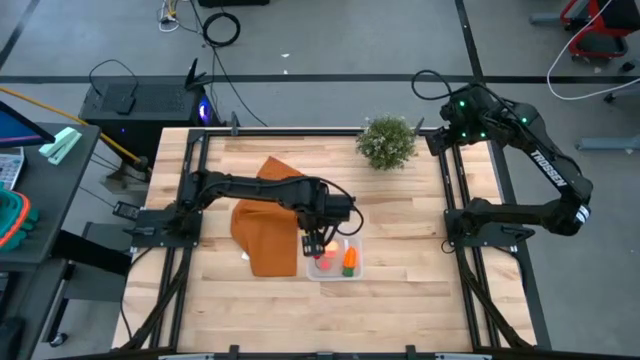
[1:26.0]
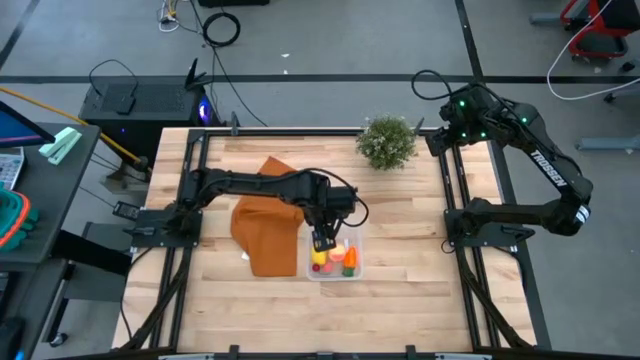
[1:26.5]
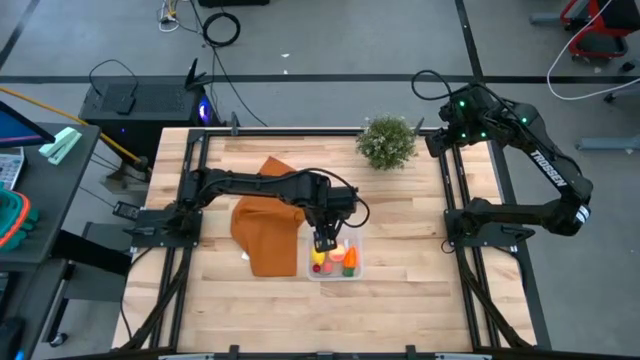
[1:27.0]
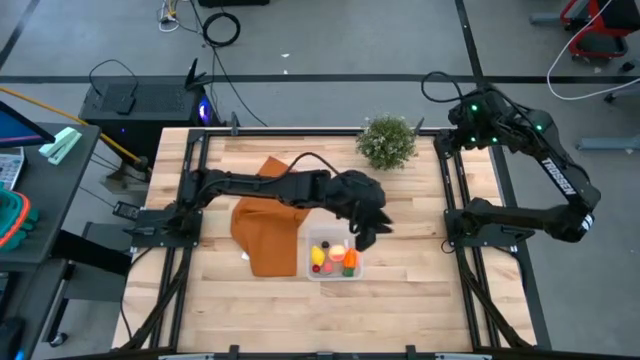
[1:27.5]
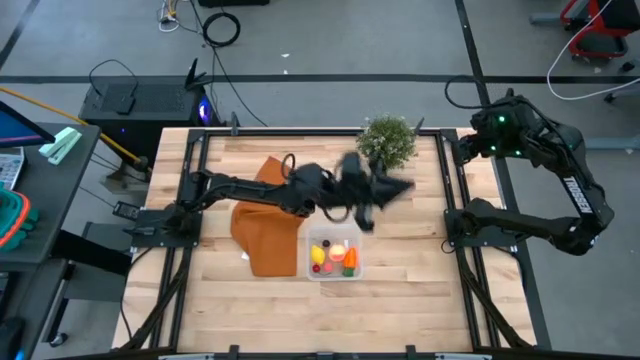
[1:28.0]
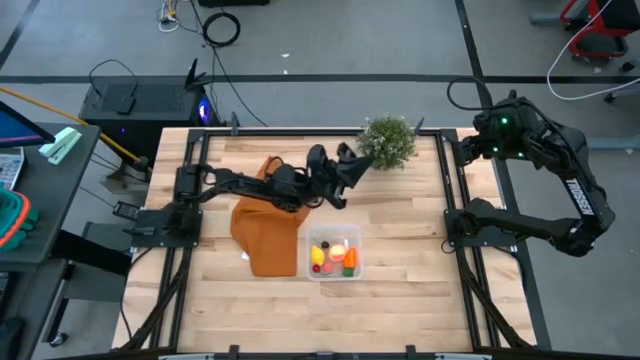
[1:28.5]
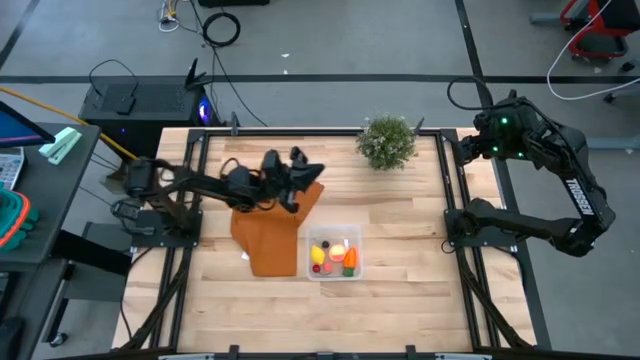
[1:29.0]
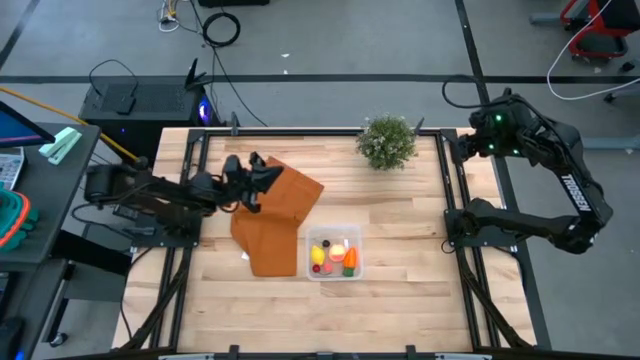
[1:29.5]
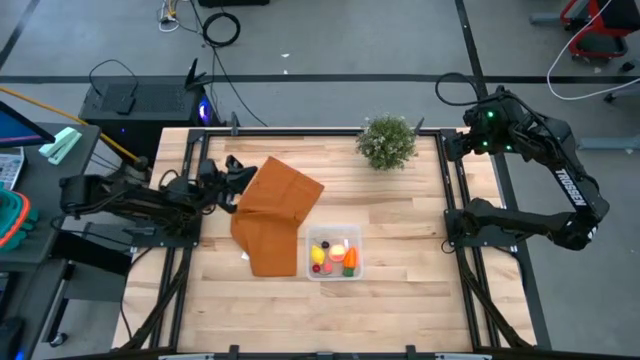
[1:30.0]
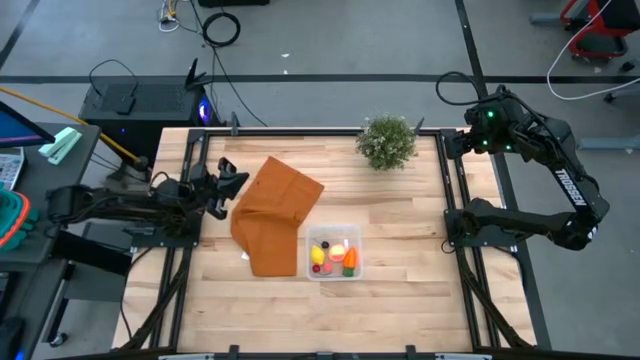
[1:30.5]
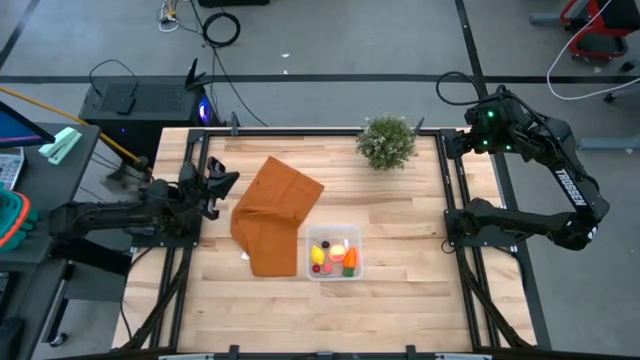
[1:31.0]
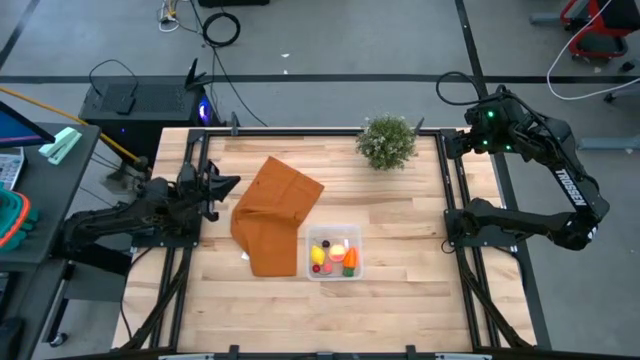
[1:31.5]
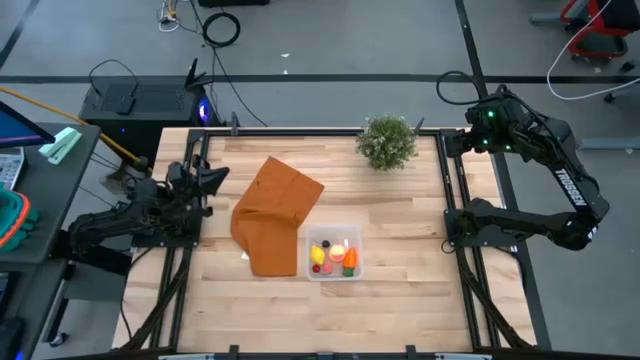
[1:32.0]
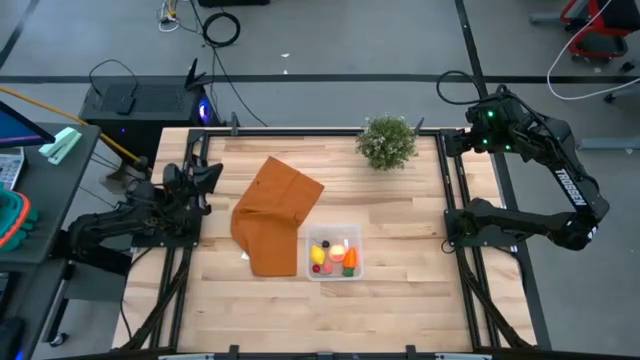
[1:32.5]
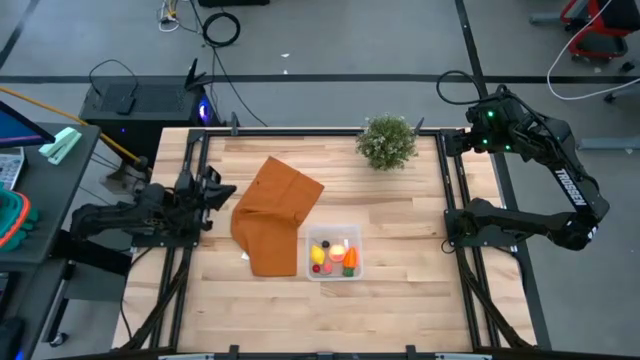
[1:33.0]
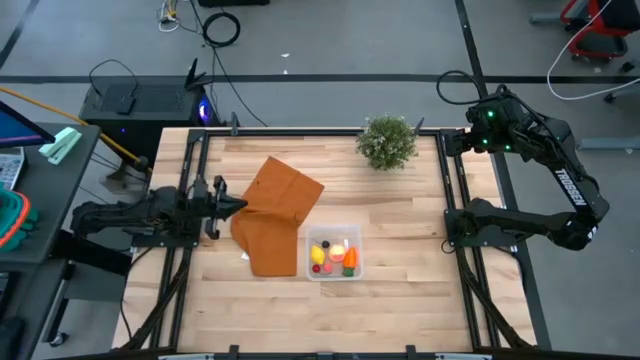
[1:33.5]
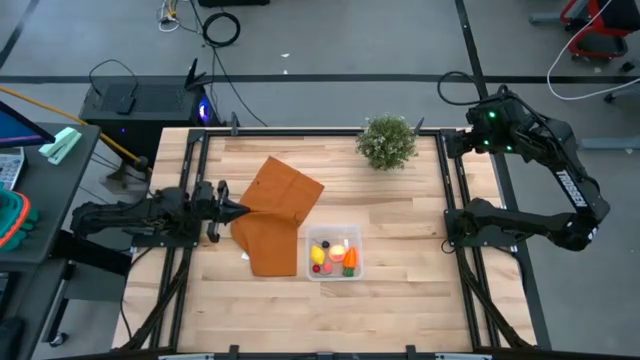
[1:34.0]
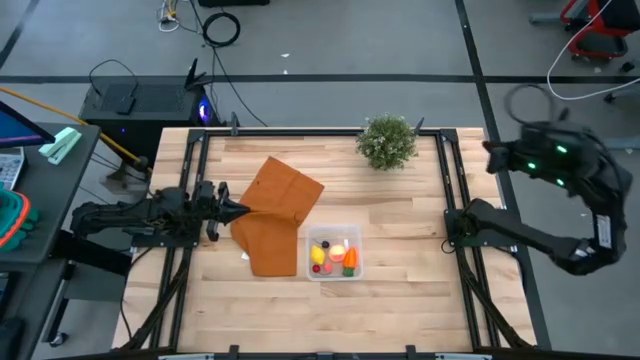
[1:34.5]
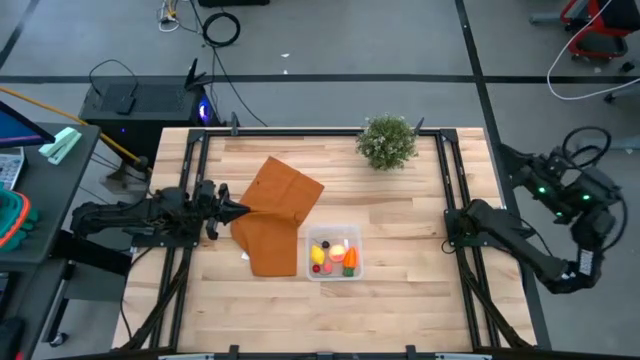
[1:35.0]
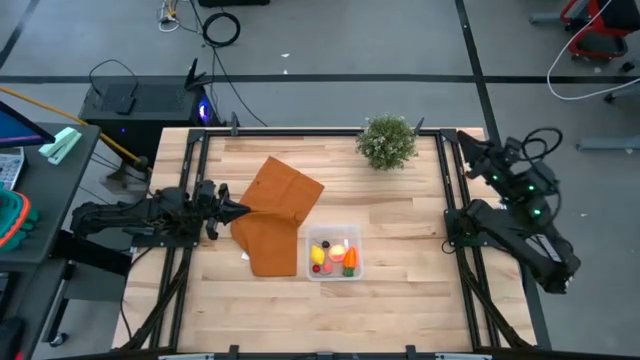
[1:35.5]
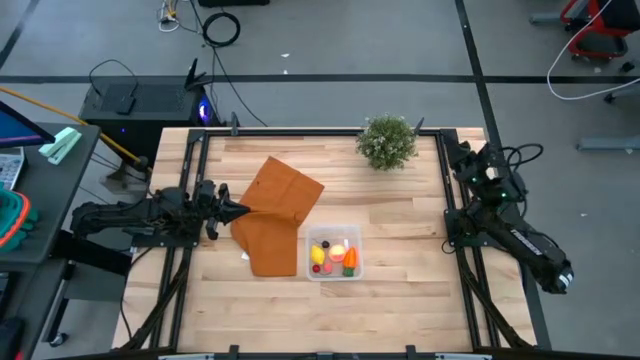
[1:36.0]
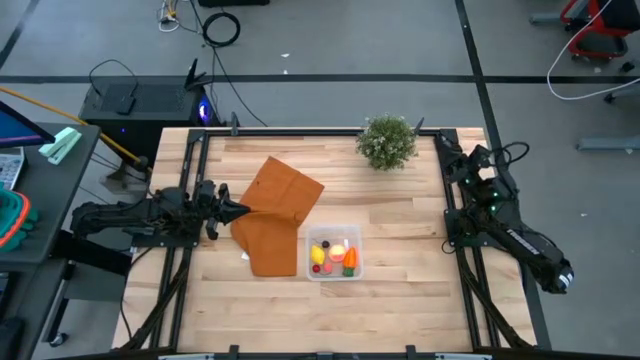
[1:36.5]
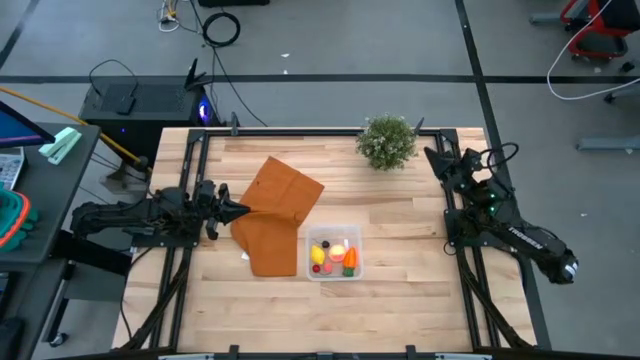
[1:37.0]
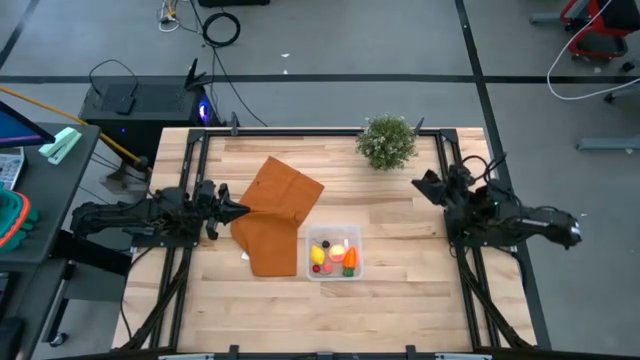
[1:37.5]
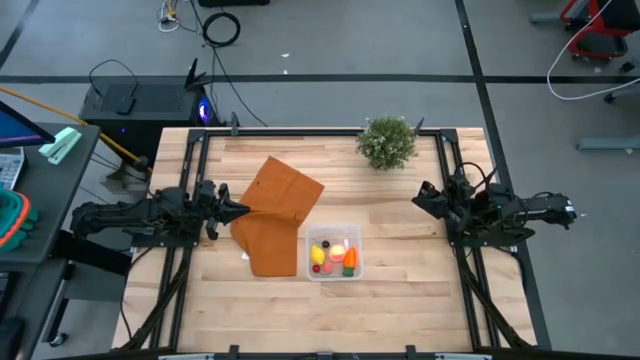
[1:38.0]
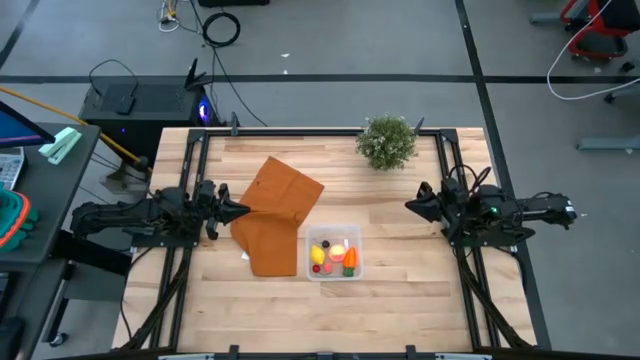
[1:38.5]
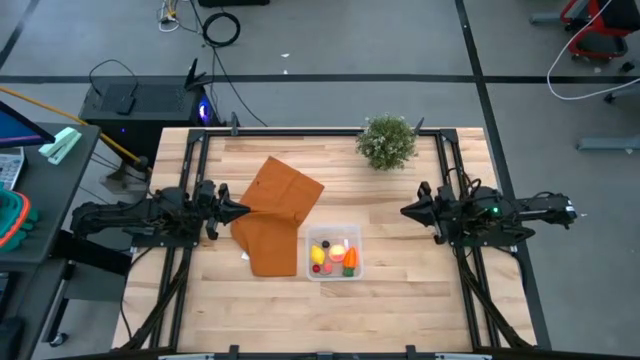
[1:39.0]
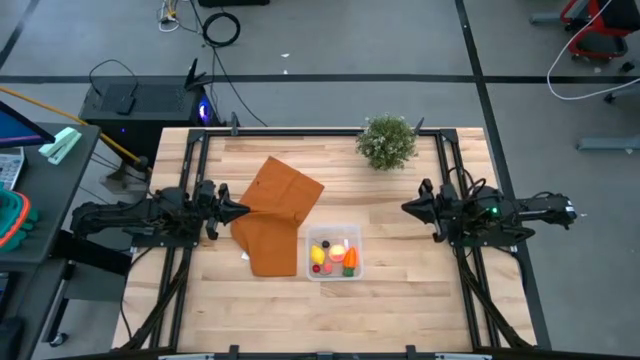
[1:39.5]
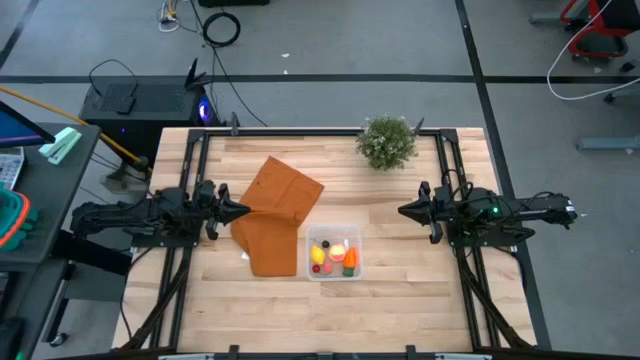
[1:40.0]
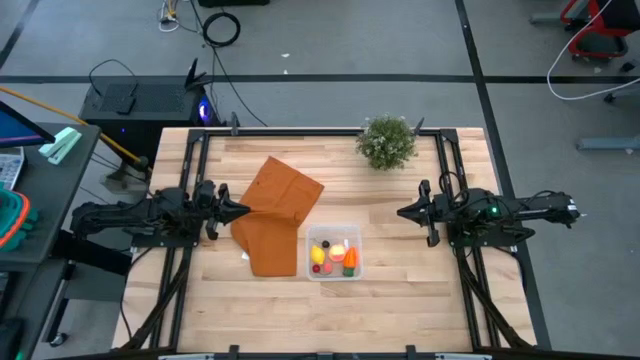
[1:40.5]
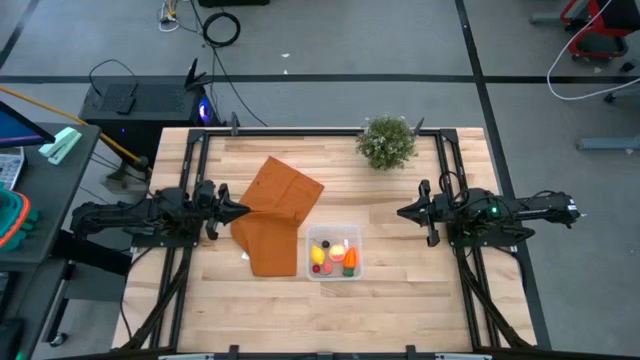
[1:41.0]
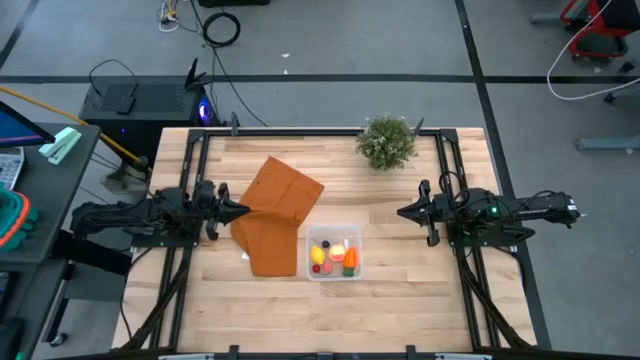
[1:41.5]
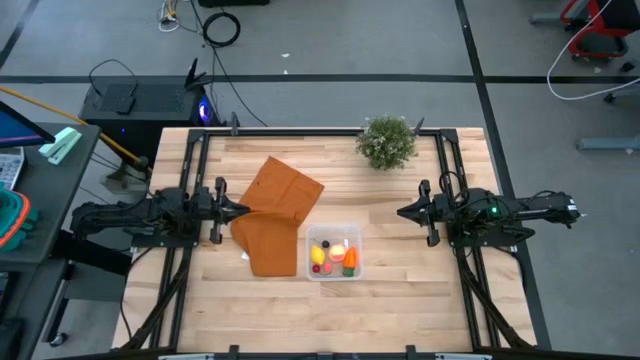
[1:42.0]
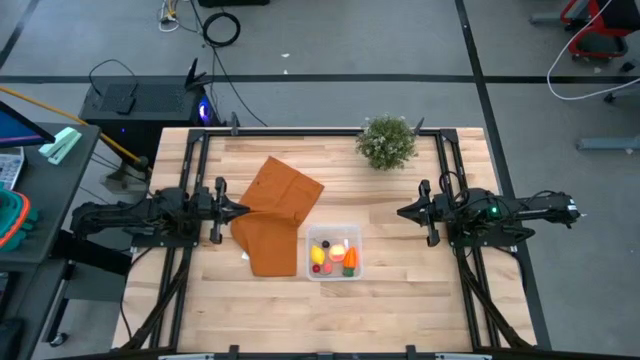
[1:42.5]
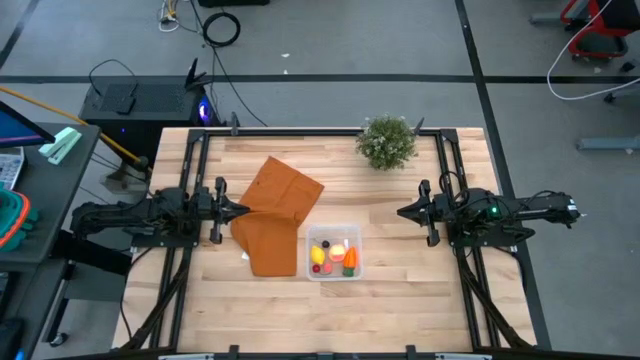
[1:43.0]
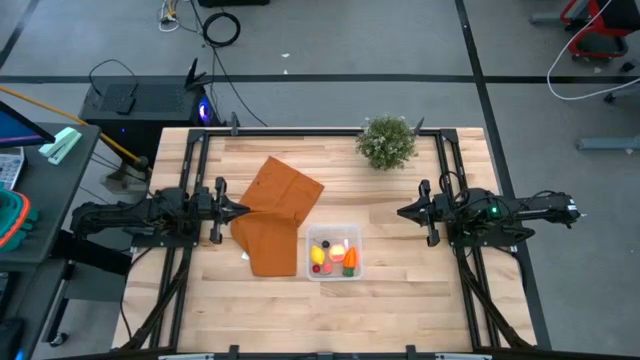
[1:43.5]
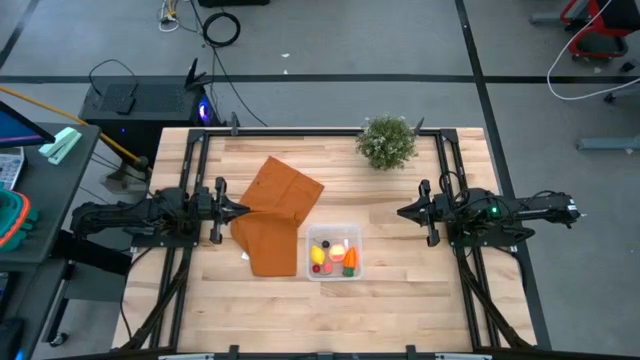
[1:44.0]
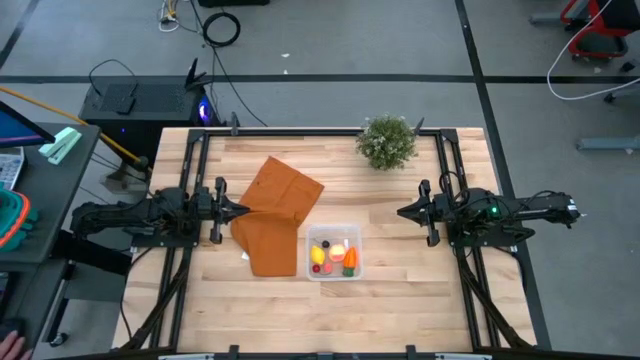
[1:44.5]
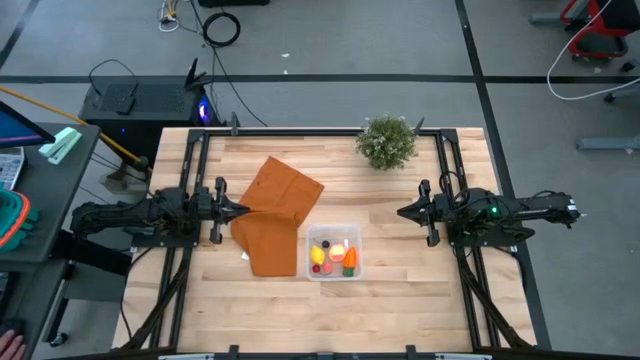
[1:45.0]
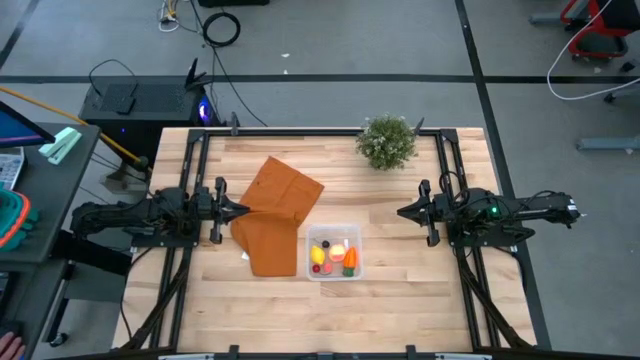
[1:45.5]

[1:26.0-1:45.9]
Task: Pick and placing Produce into tupperware
Return to Home Position

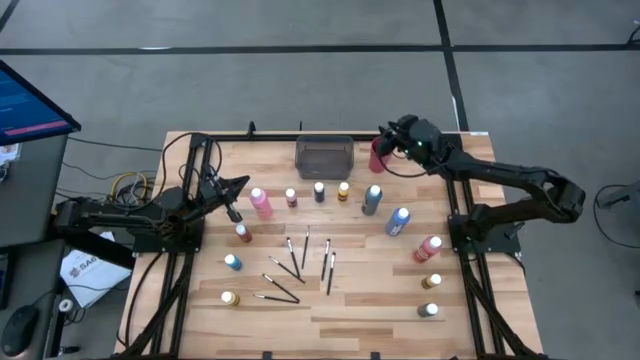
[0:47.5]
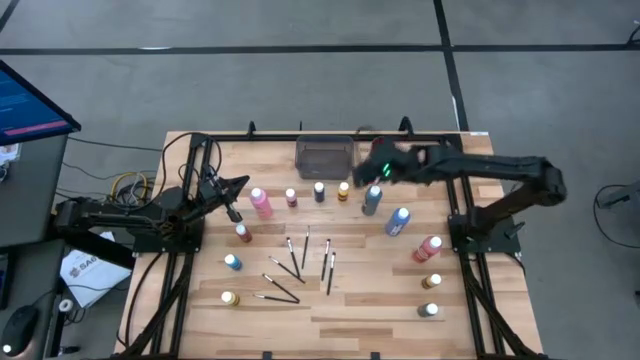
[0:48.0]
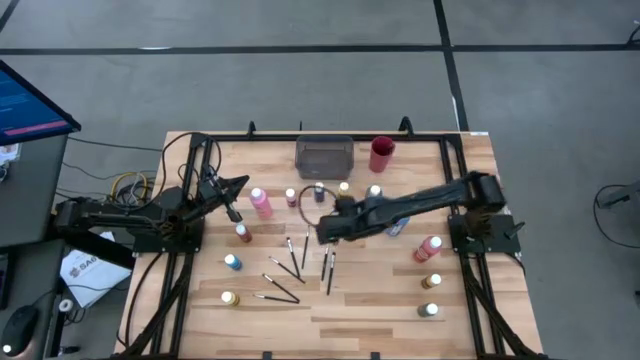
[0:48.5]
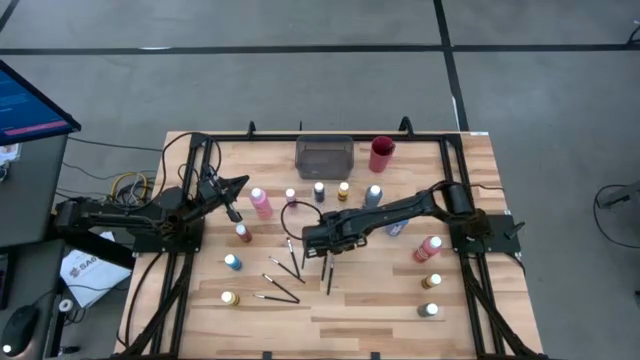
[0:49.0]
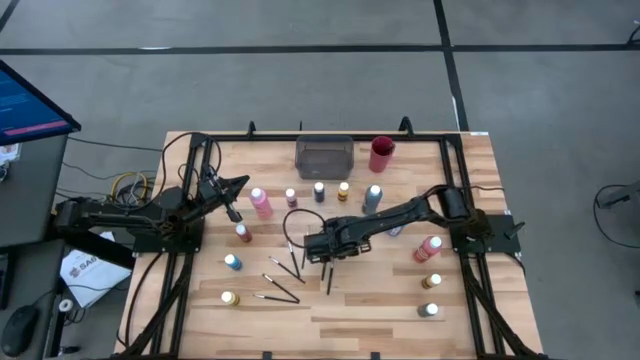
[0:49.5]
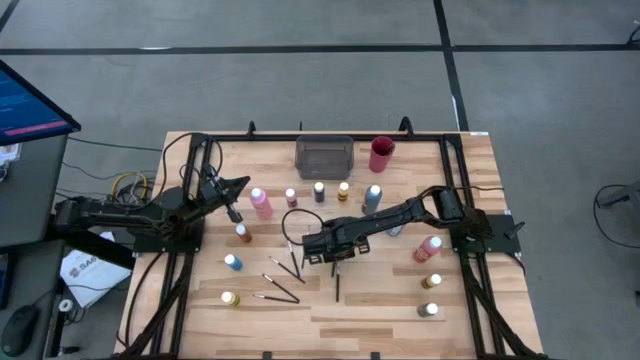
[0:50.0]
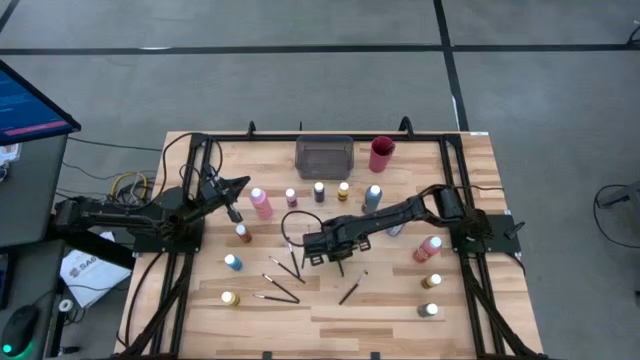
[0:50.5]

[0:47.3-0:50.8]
Task: Pick & Place Paint Supplies
Put the black paintbrush into the red cup
